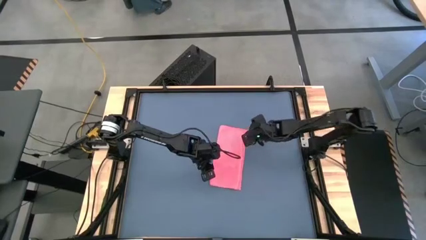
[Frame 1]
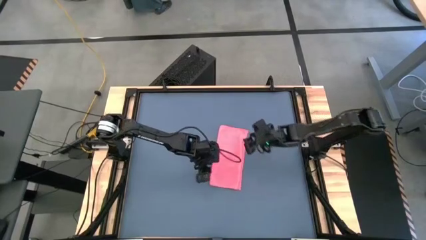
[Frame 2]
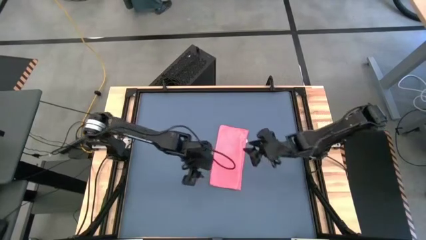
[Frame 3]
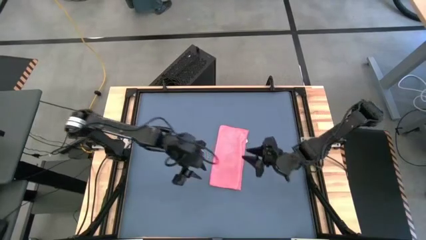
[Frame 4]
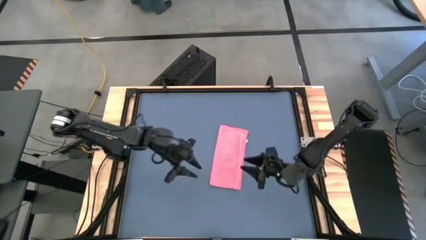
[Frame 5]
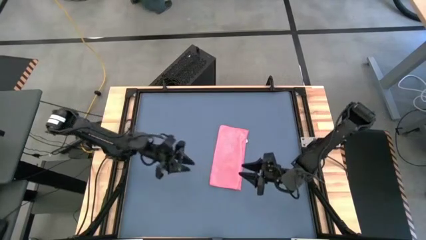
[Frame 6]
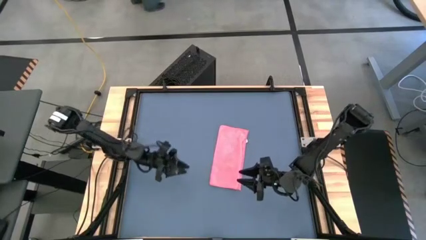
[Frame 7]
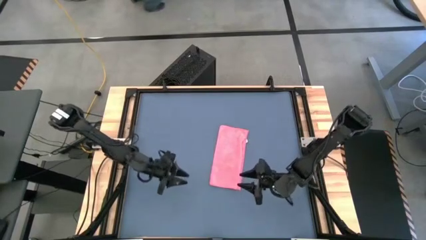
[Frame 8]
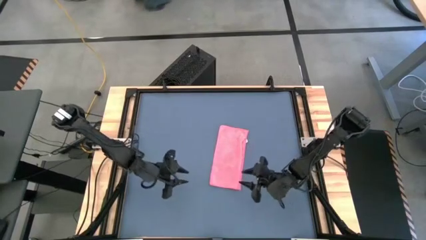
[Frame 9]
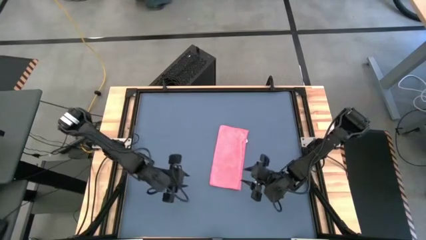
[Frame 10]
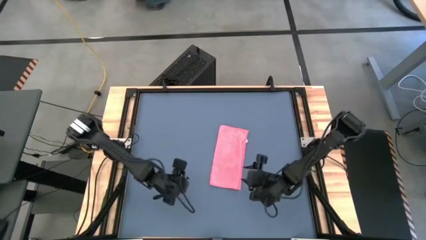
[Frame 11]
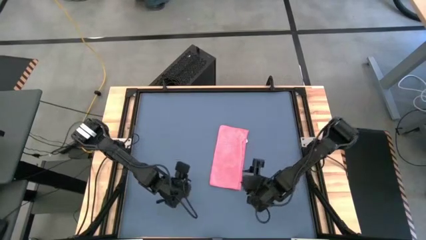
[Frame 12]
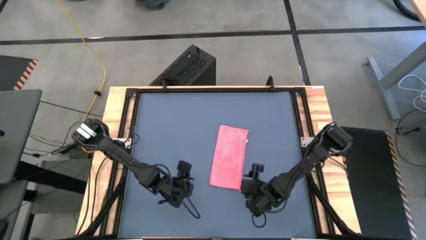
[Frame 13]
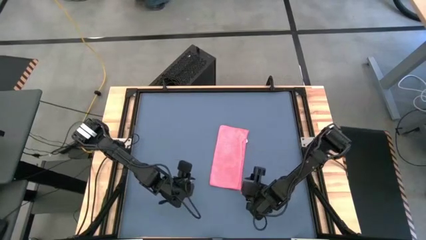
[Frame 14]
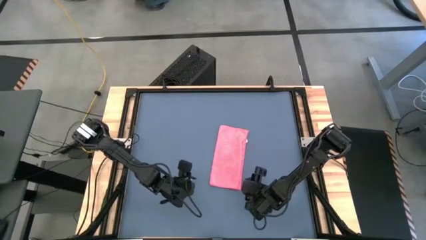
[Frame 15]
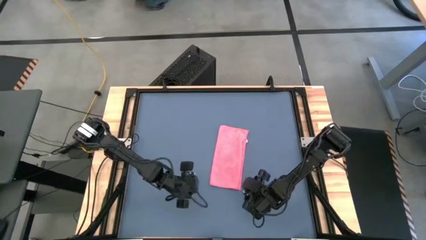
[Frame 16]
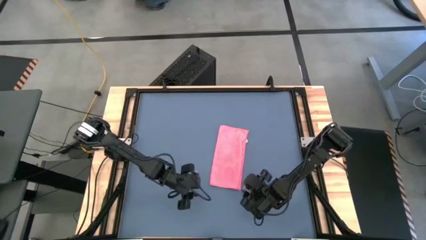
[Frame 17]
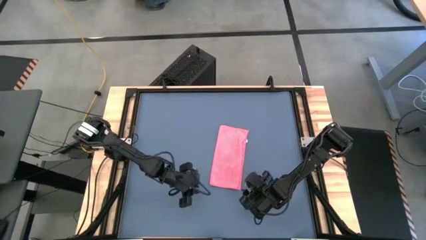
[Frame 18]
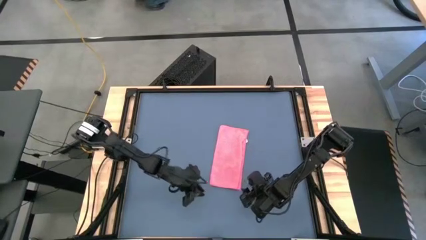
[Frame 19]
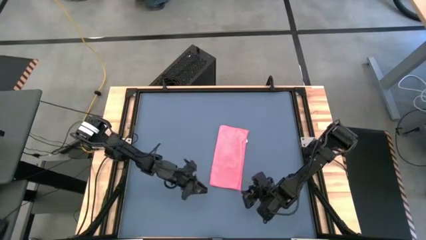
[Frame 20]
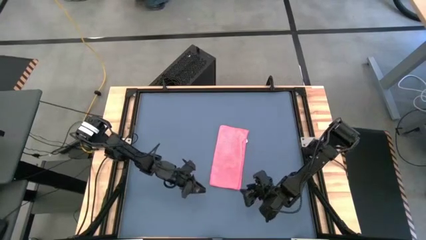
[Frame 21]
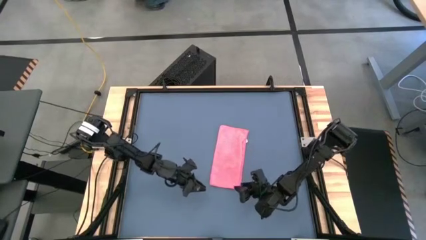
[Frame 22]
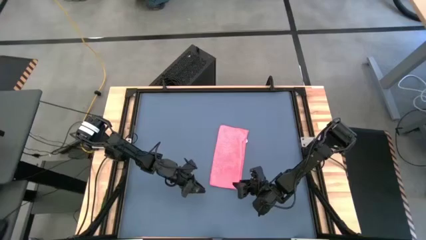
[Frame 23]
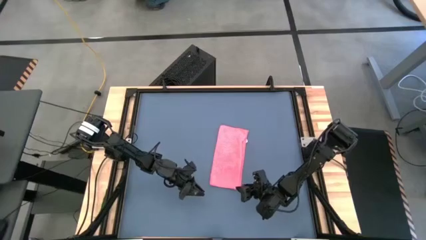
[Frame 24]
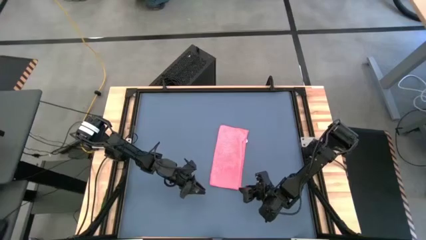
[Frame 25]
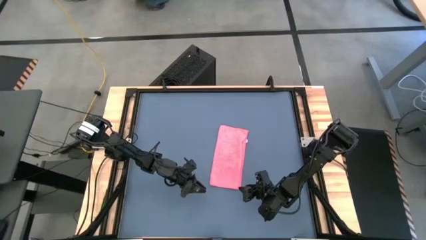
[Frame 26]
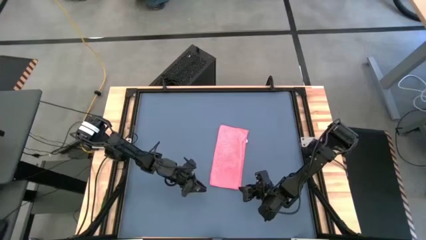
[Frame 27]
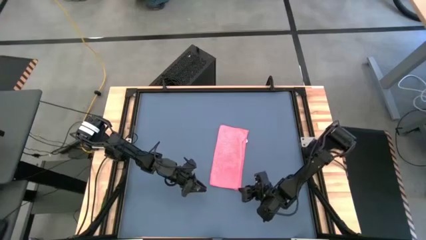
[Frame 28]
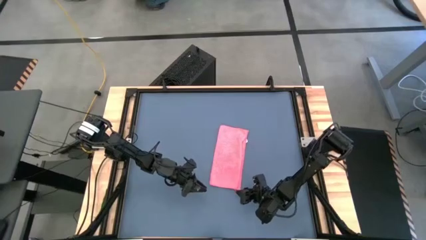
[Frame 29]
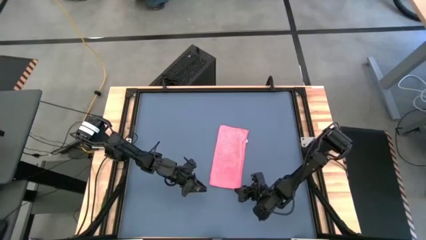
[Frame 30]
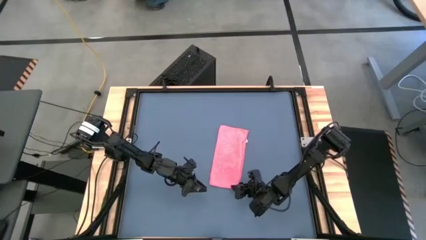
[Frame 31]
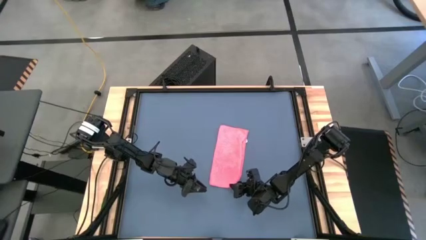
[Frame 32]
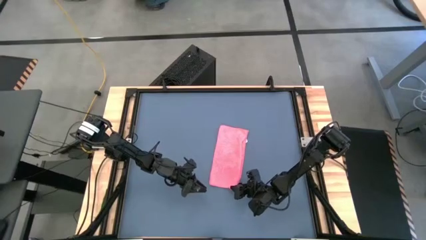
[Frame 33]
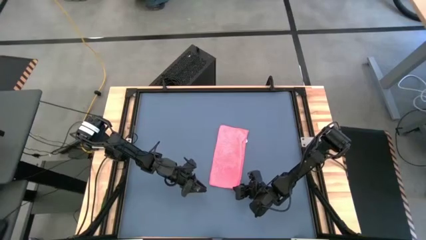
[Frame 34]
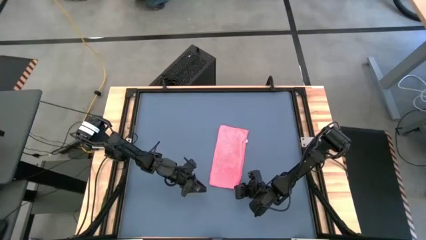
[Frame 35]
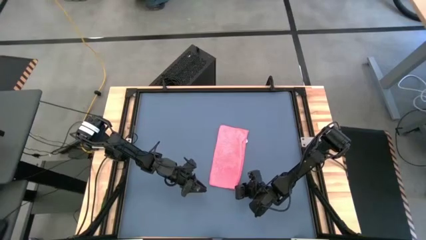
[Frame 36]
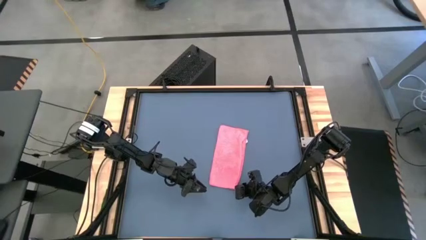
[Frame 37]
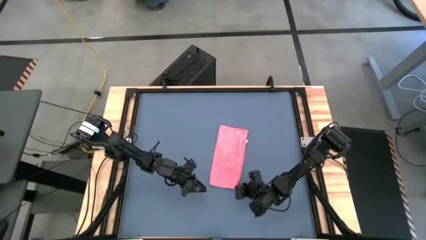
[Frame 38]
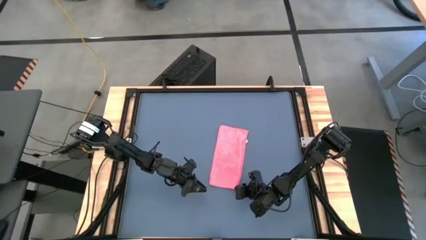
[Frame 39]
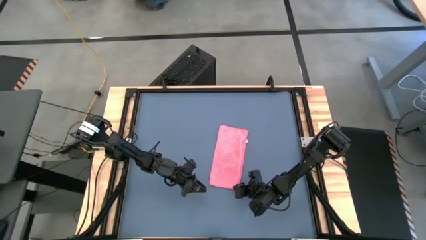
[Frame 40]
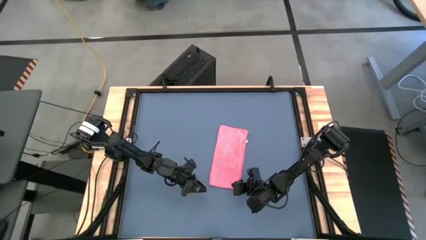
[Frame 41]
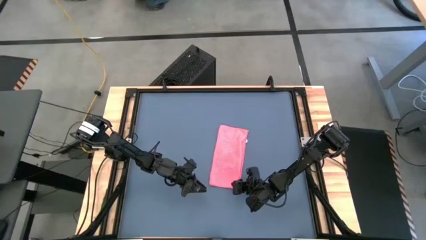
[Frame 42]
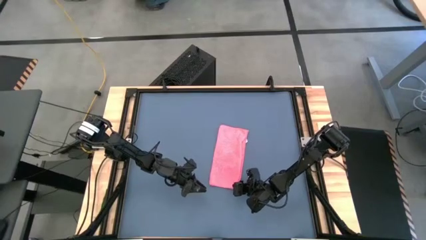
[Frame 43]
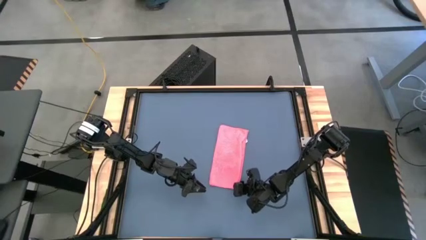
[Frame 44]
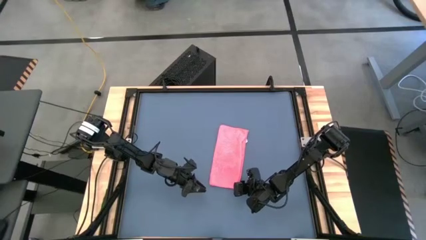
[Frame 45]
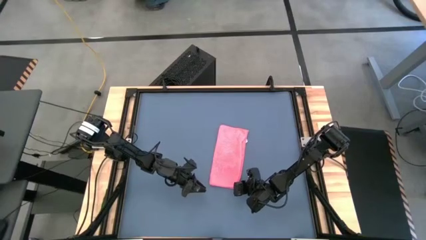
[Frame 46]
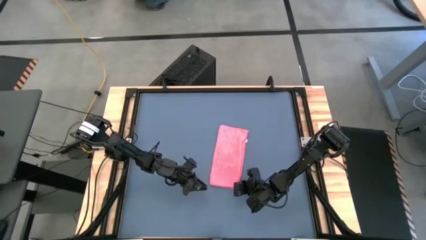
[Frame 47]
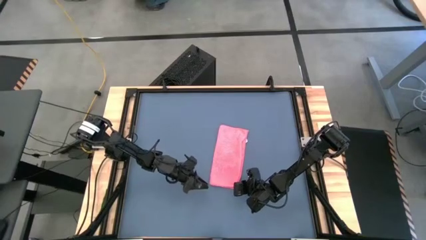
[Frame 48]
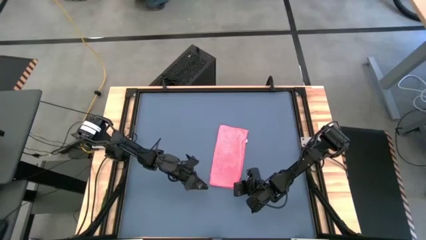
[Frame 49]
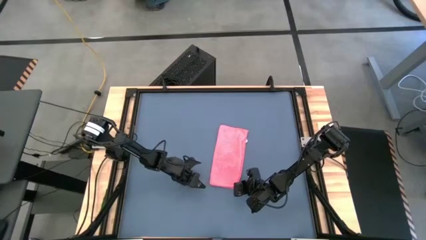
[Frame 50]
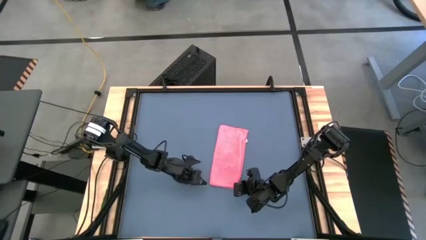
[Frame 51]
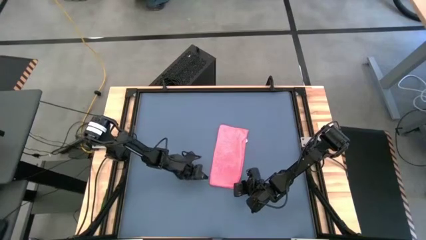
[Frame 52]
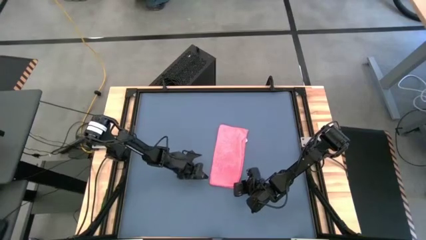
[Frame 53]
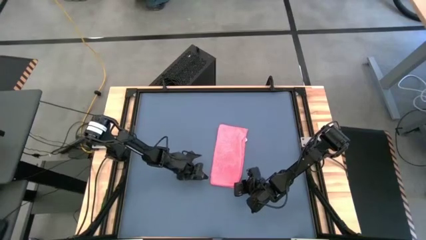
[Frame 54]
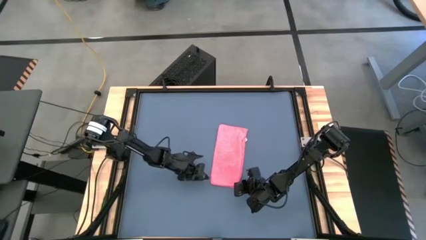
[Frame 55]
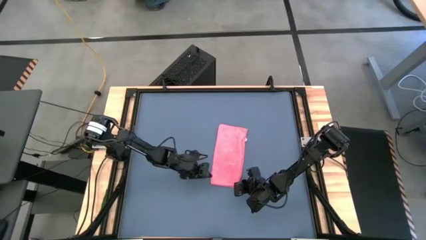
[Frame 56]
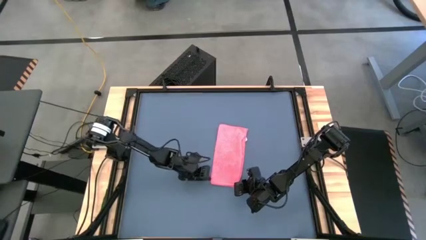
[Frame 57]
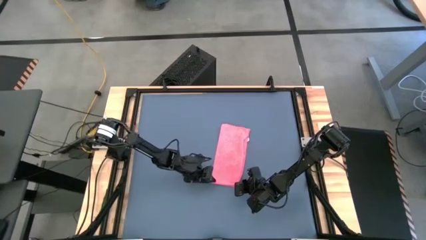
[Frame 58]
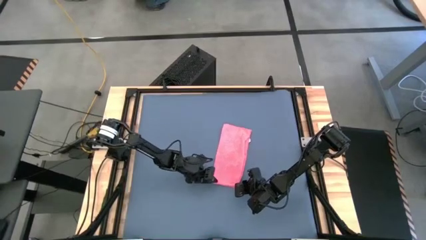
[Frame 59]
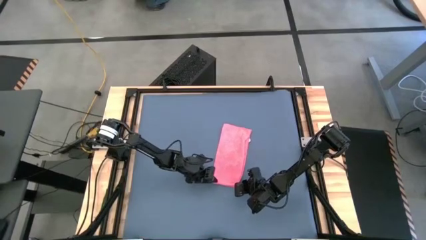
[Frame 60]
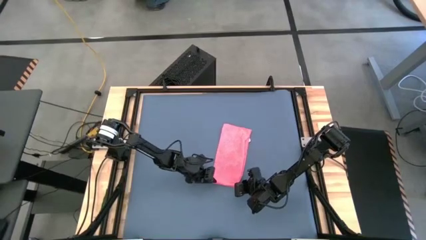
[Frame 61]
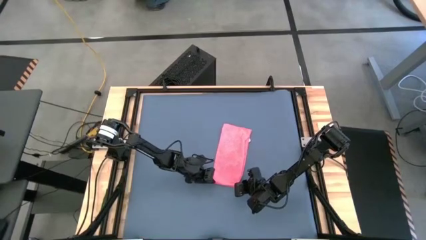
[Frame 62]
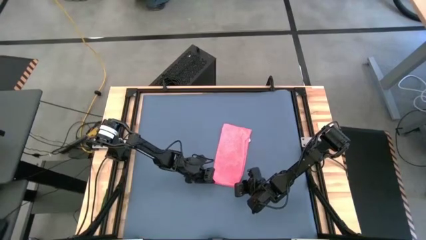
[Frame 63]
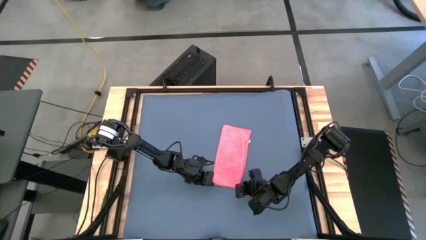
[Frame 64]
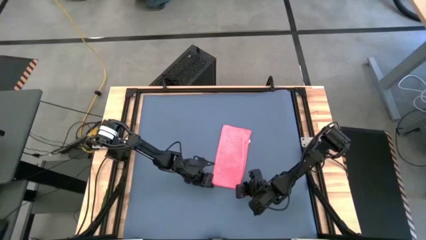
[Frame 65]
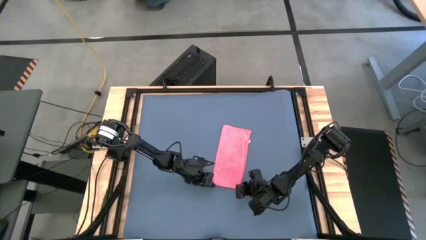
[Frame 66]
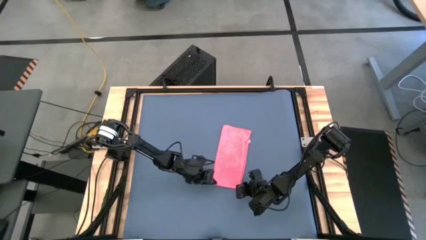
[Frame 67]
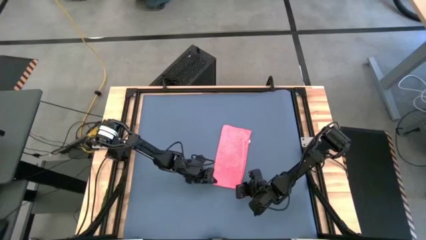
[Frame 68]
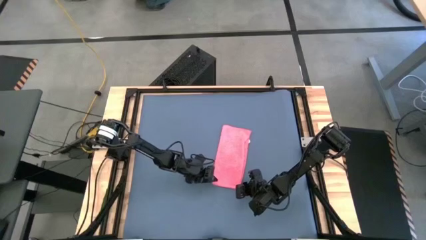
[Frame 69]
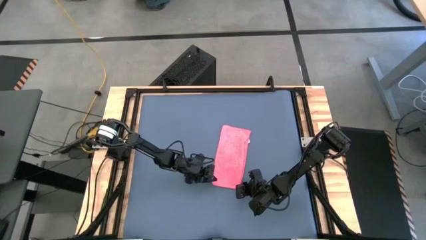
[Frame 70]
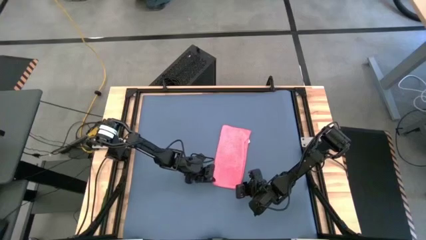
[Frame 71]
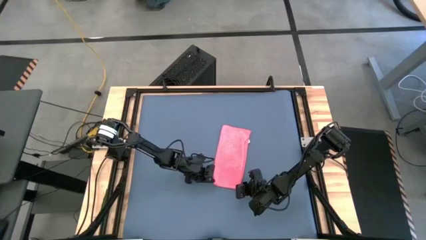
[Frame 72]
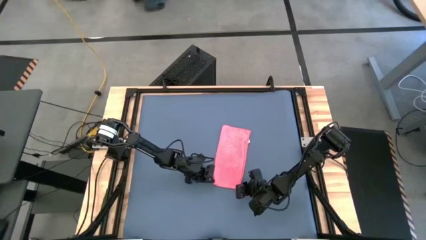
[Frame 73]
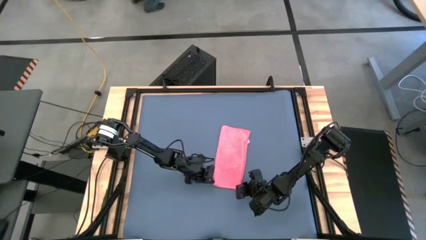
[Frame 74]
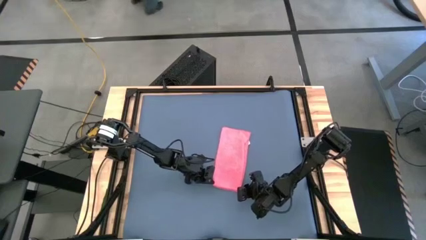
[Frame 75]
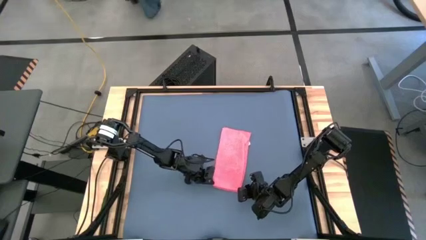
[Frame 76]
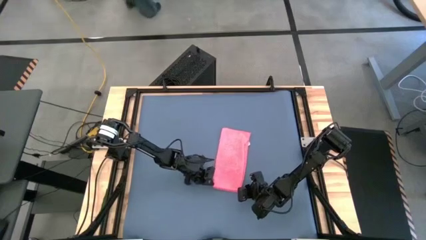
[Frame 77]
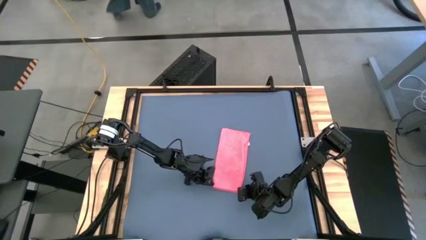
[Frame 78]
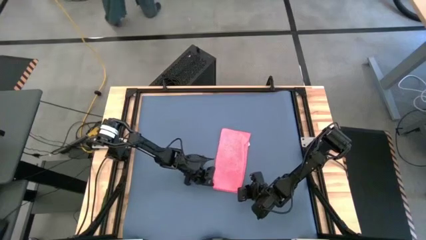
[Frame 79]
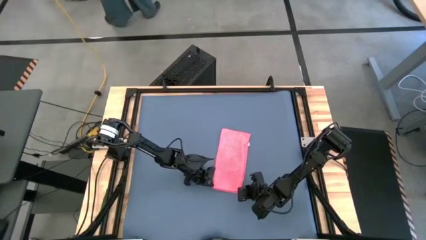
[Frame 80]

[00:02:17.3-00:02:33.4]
Task: Roll towel
Roll the pink microfiber towel
